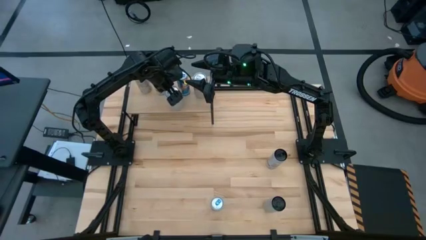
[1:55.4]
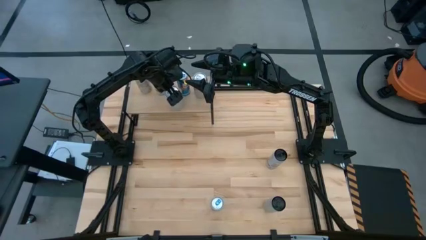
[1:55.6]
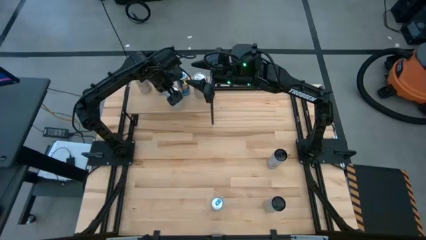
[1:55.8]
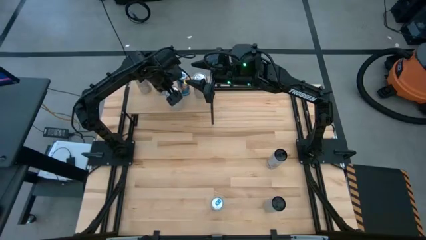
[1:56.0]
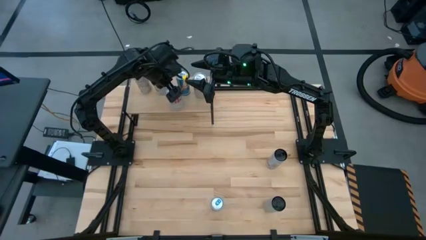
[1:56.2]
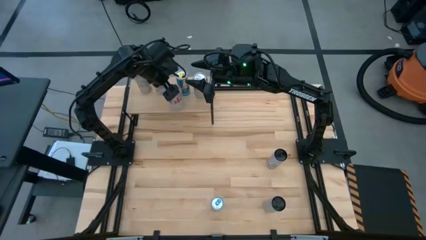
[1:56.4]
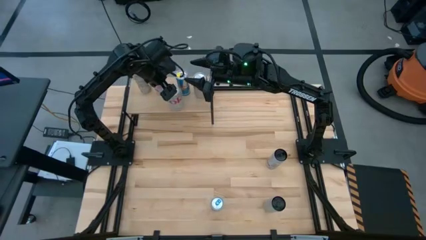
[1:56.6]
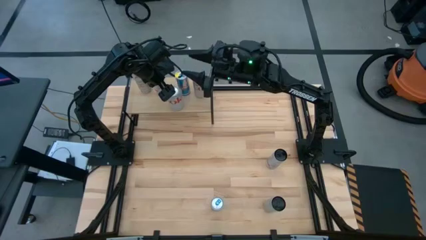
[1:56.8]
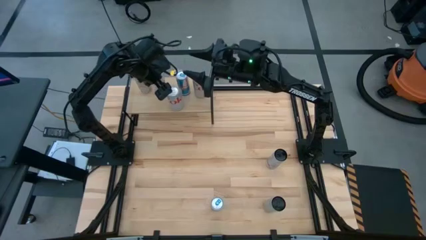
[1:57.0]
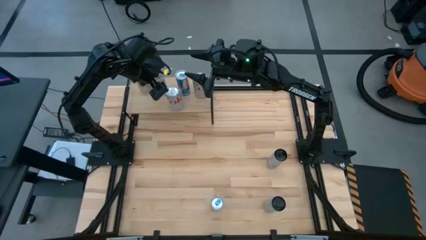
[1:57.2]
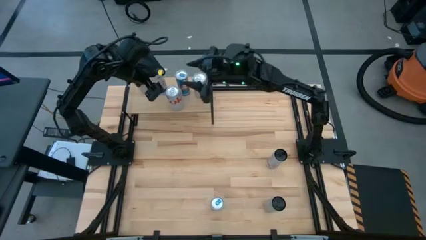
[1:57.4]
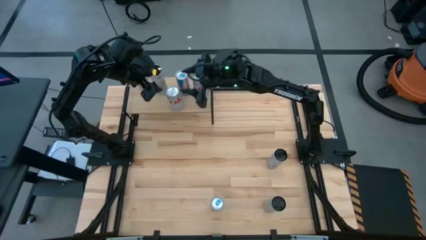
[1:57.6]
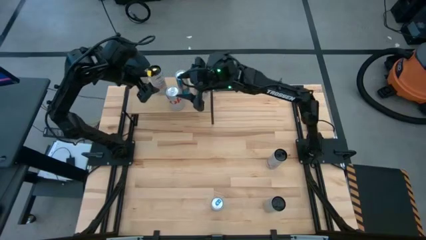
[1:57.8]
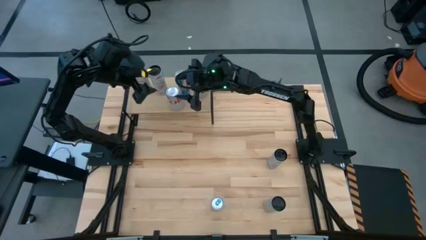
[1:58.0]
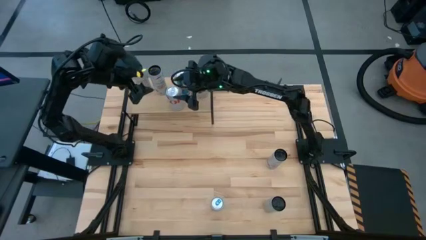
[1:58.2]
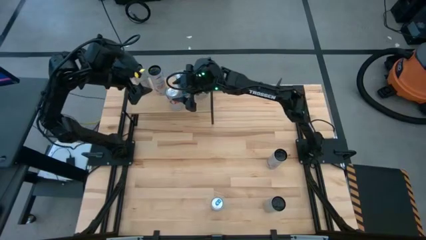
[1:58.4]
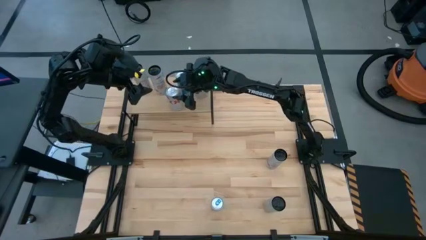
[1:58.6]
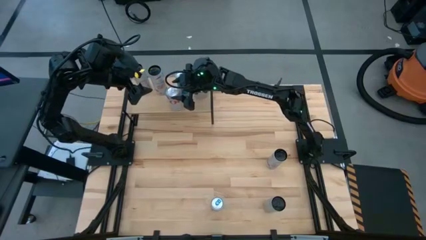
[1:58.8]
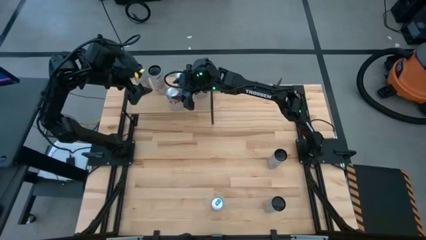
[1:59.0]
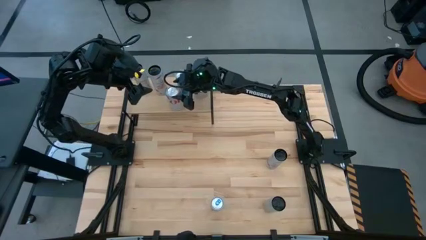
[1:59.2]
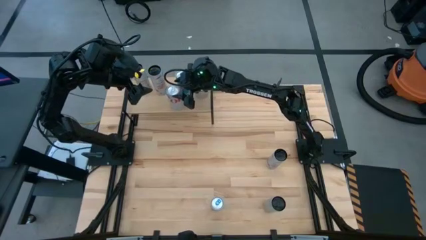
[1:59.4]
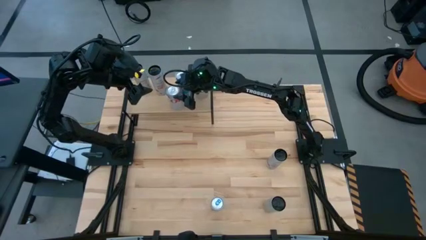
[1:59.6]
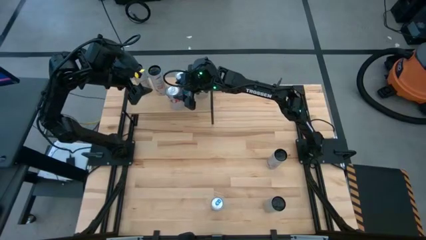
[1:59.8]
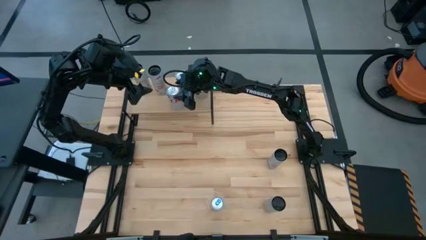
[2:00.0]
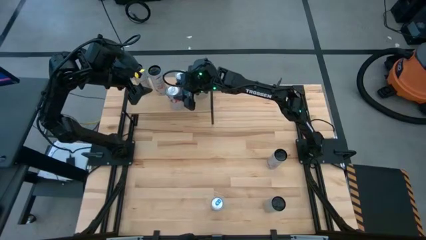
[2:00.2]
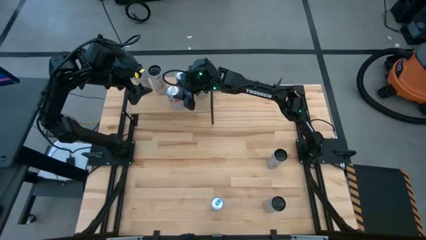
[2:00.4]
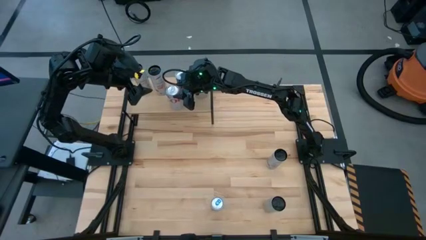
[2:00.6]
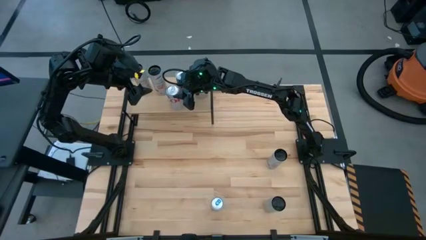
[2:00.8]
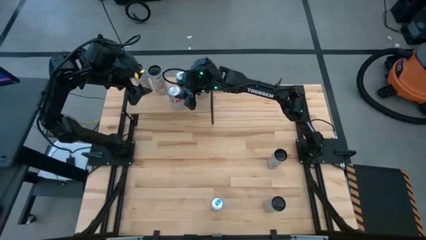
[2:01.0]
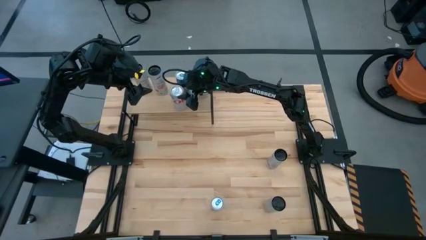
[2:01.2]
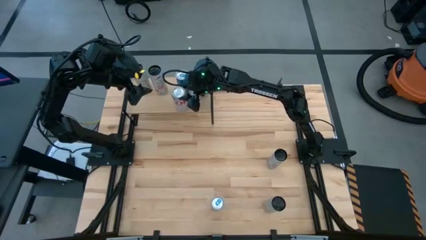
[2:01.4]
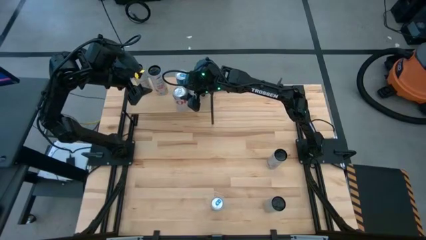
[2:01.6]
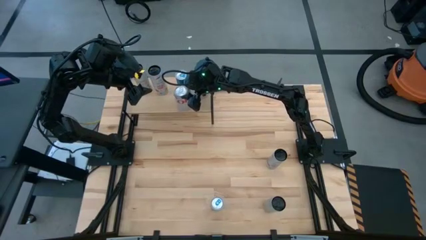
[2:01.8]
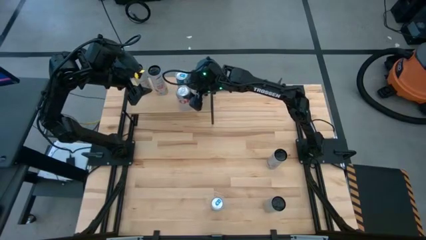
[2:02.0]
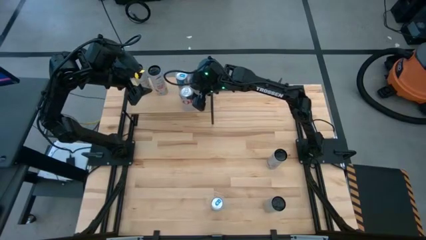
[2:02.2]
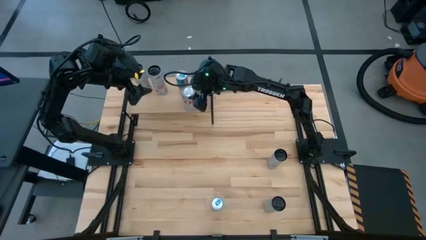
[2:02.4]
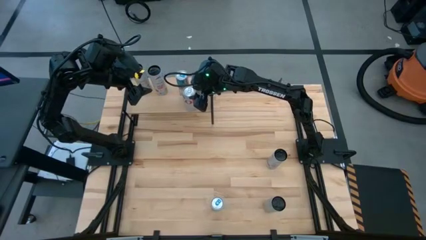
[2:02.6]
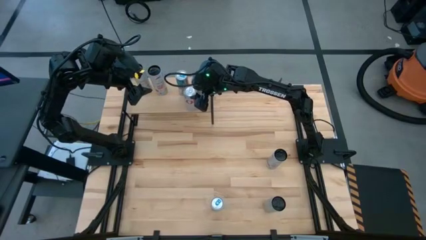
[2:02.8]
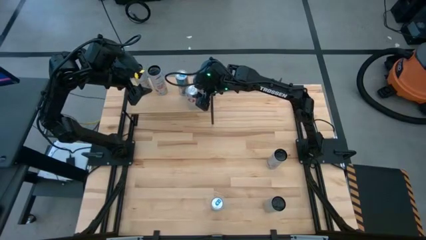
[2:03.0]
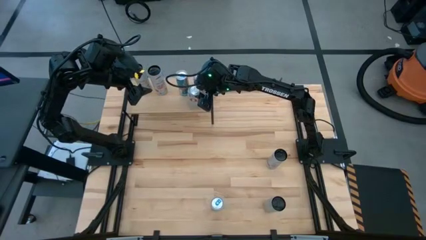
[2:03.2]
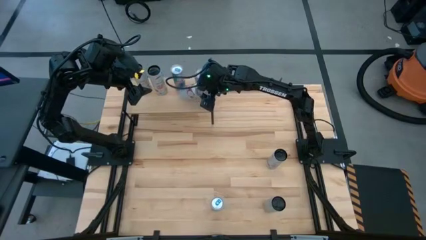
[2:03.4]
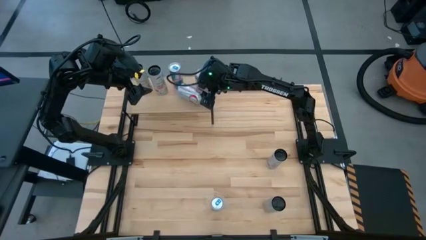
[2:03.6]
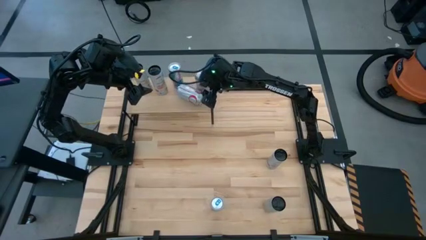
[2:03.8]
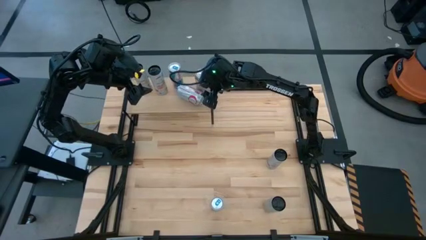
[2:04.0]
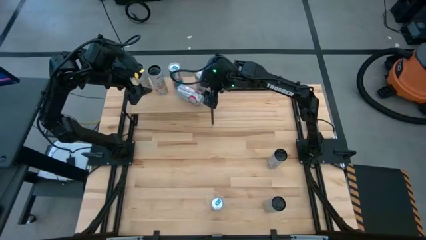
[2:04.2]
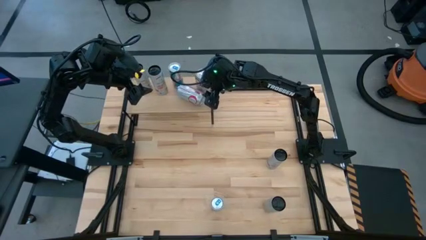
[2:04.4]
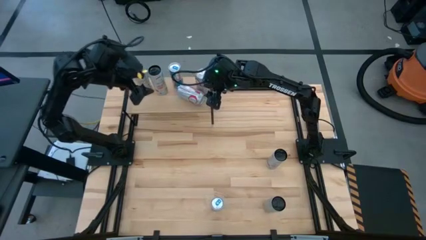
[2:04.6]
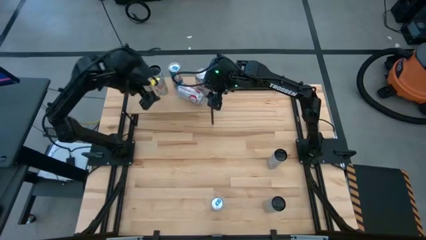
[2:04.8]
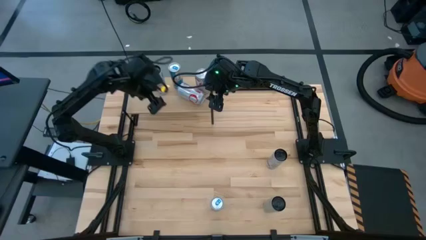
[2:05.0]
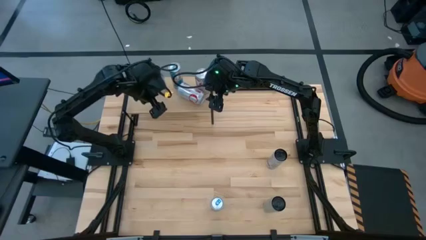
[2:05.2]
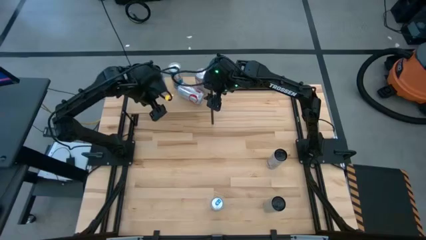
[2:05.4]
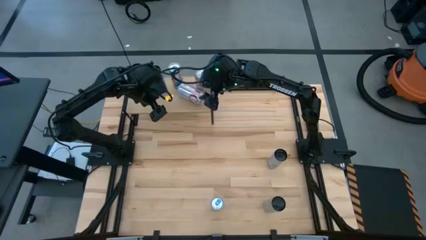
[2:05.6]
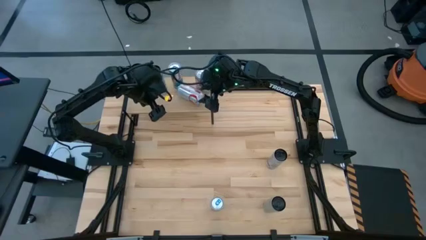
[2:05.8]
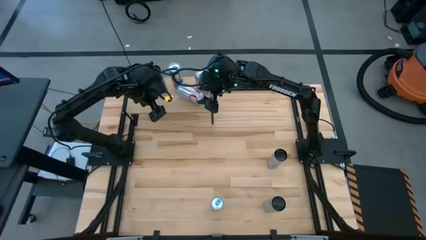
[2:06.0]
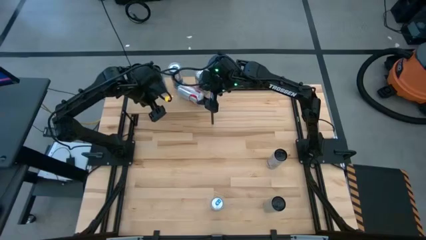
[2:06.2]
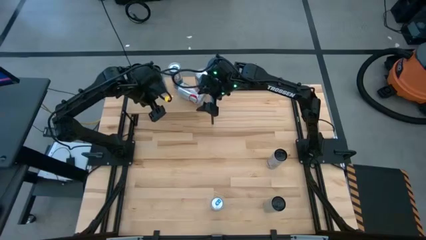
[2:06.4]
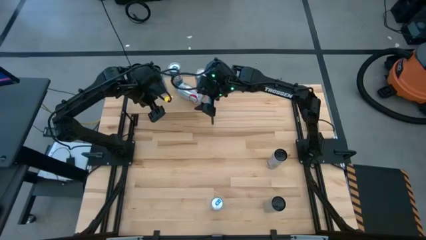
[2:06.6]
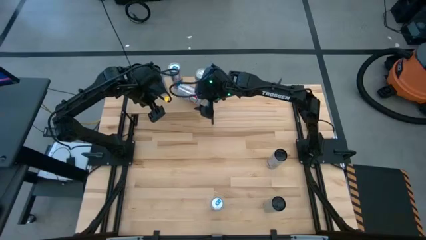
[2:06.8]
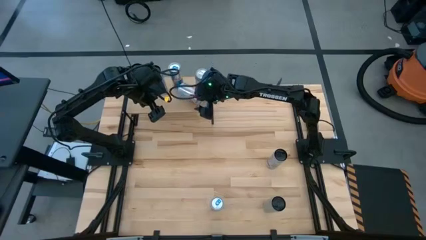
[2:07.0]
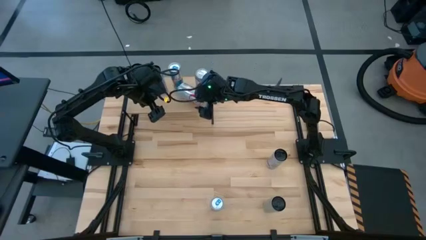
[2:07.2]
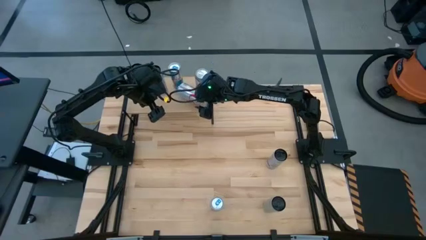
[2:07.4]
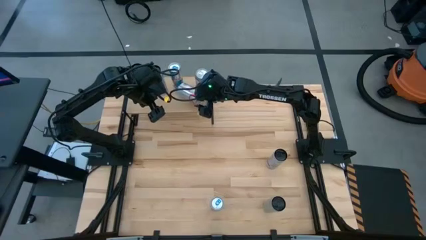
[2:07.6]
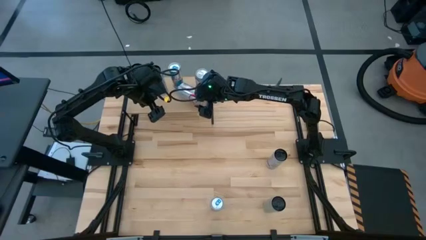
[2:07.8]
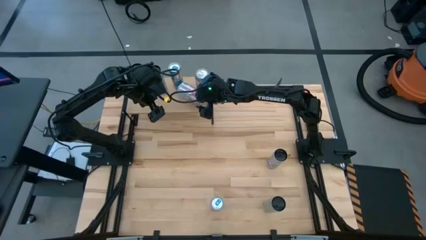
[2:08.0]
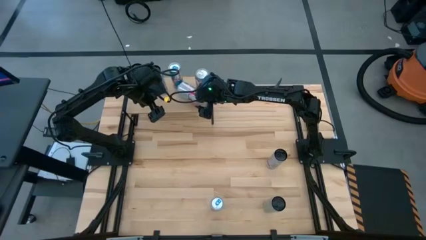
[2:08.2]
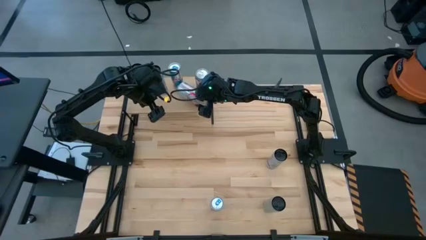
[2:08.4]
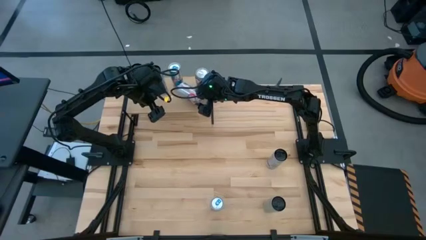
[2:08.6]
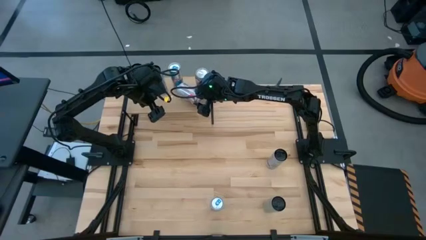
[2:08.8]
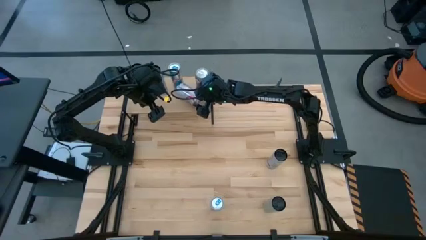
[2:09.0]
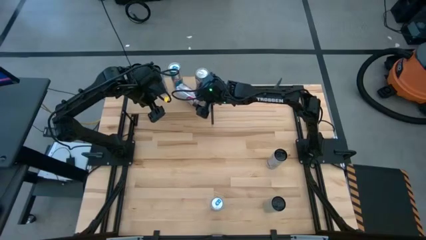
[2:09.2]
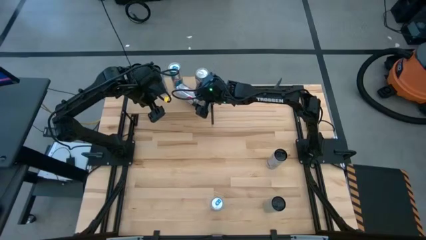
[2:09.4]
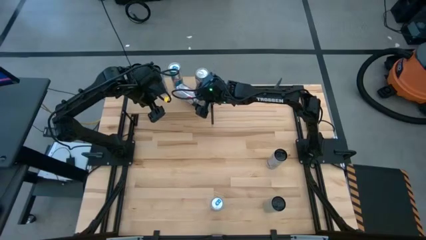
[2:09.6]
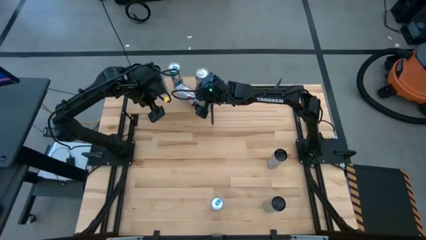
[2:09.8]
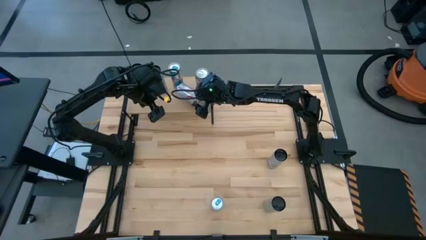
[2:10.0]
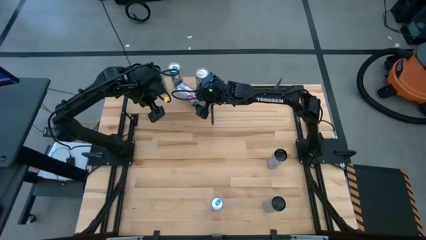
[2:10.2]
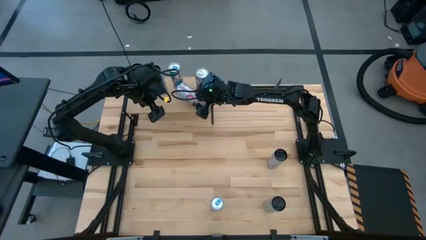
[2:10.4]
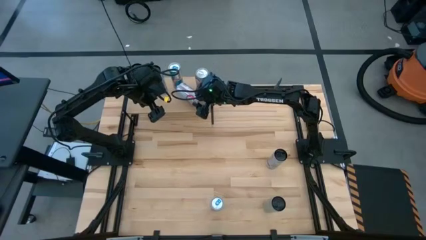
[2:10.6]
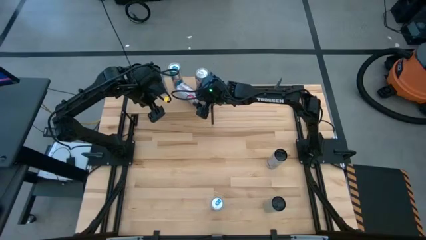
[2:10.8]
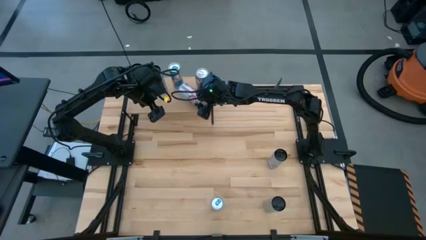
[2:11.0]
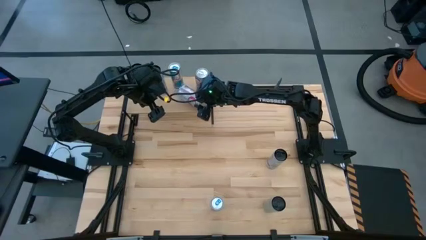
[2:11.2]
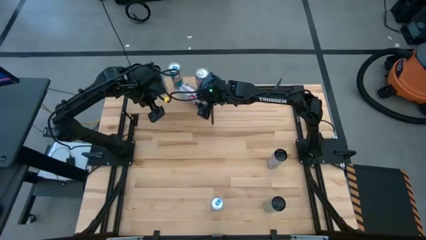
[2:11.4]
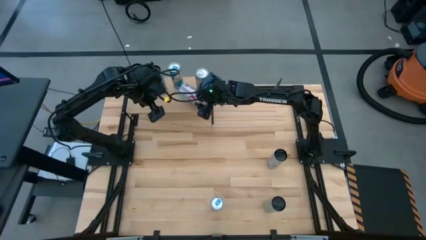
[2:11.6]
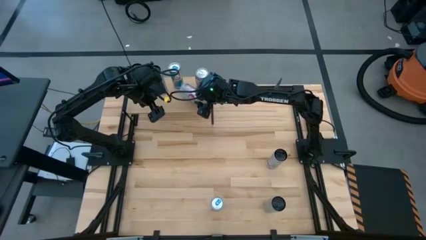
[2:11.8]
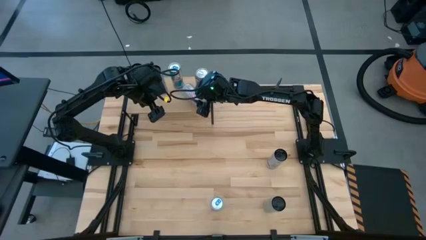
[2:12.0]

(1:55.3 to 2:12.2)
Task: Place canned beverage on shelf
Put the red-silver soda can on the shelf aligned with the other red-silver soda can
